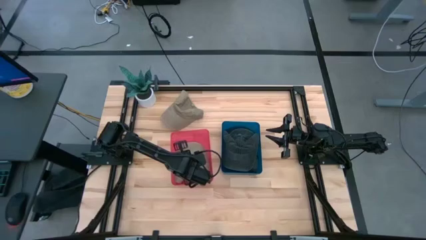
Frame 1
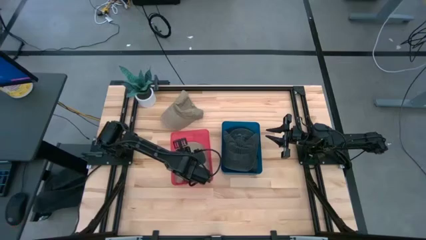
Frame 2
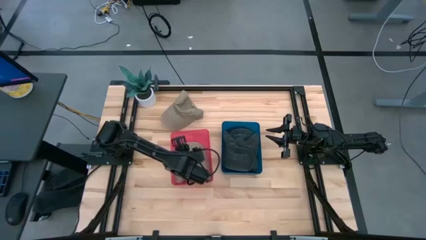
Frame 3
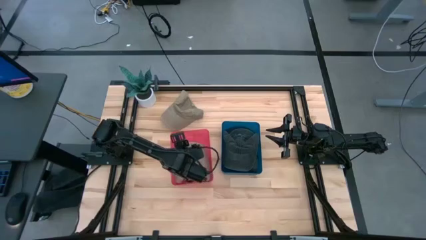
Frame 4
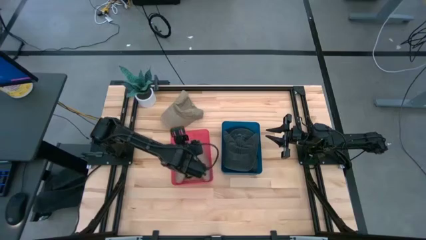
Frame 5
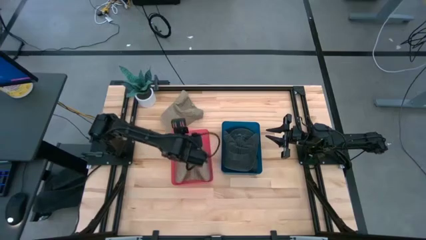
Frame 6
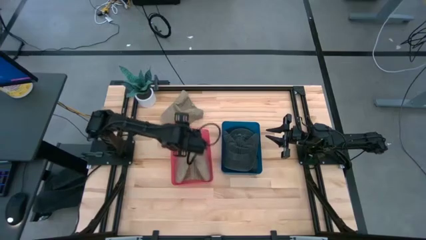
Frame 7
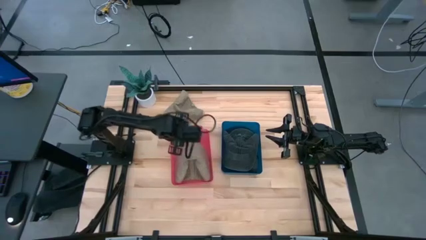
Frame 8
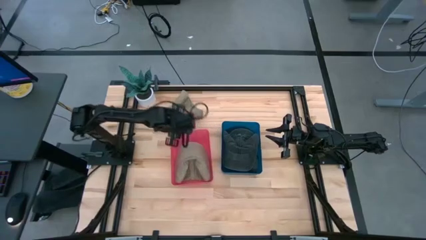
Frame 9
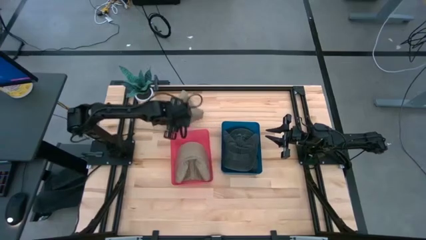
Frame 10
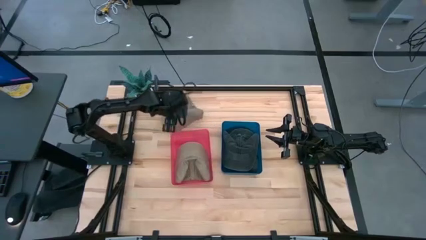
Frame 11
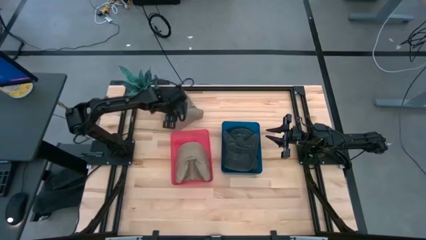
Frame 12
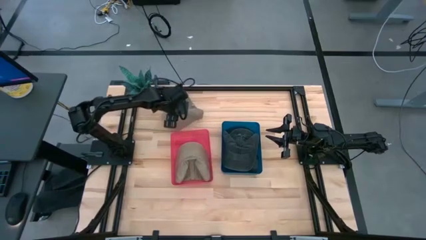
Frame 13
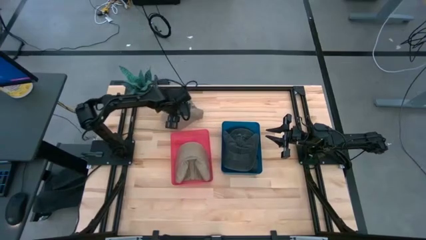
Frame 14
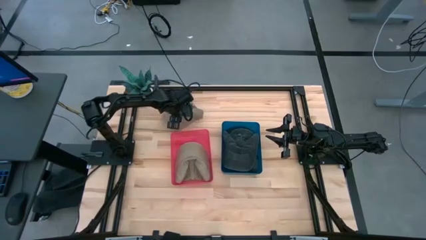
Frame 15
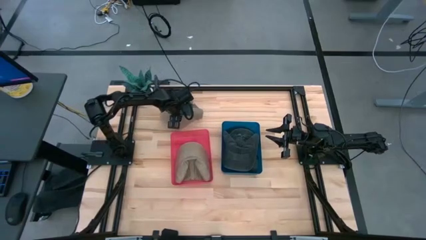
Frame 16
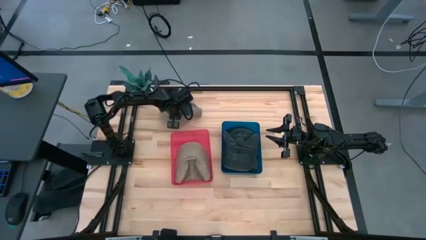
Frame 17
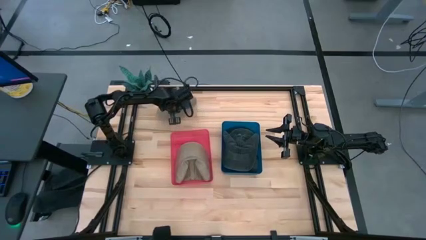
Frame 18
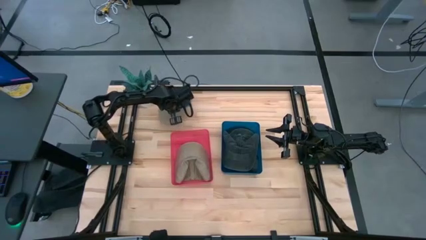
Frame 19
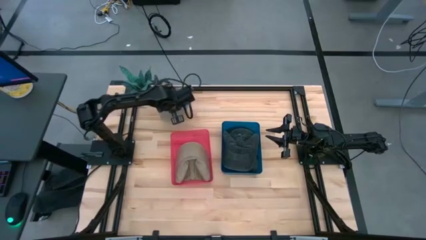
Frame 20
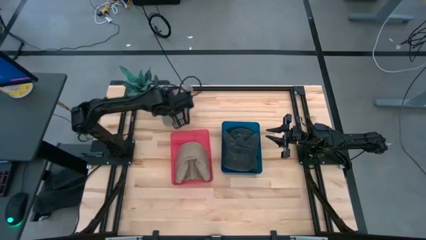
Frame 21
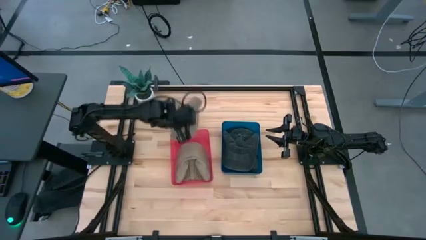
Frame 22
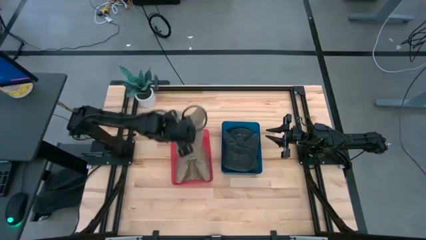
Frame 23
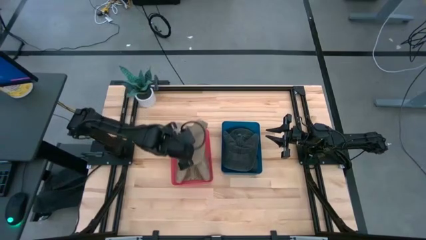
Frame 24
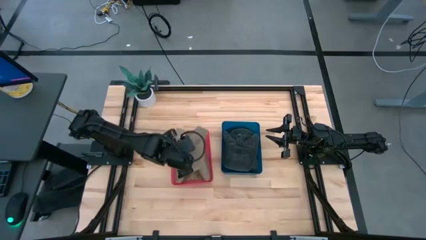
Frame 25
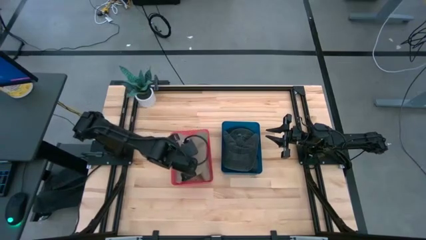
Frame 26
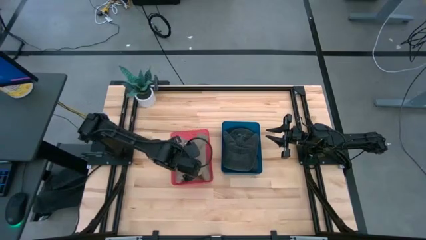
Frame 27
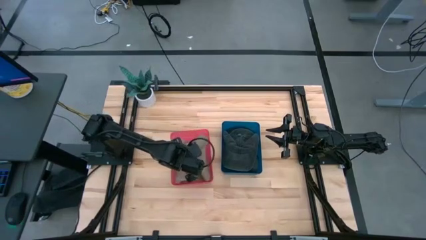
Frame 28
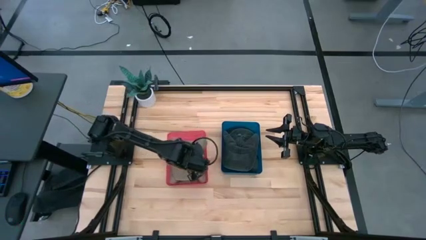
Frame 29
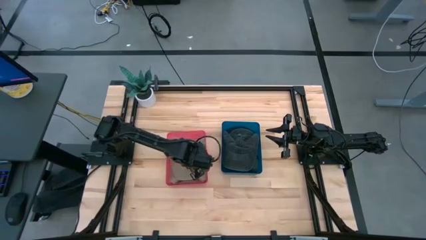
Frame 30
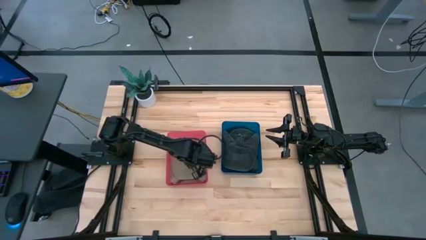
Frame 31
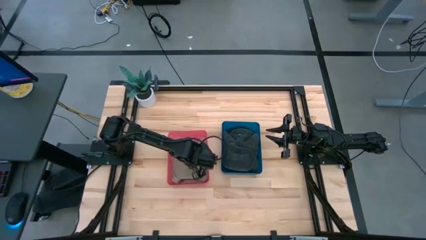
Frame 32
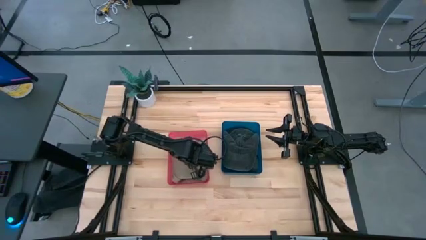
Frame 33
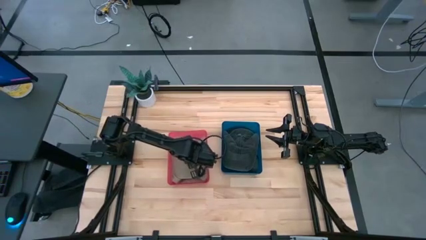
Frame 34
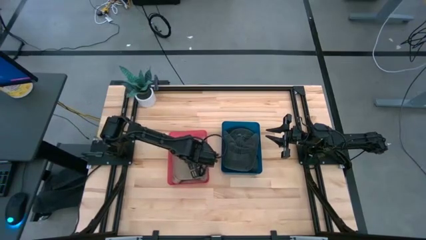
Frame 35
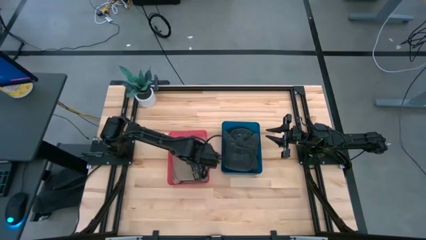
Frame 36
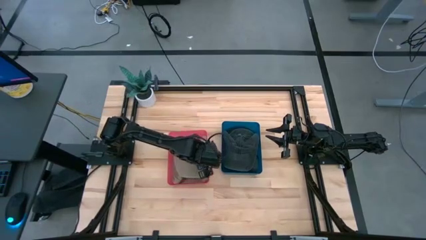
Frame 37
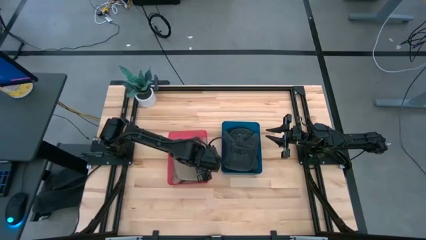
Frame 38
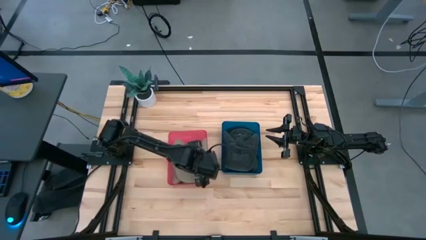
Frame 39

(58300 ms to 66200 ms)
Task: Pick & Place hat
Put the brown cap into the red bin

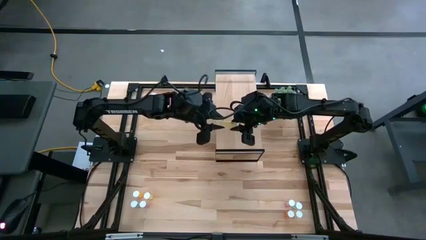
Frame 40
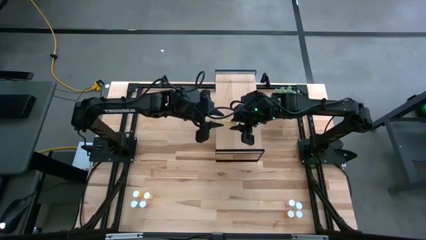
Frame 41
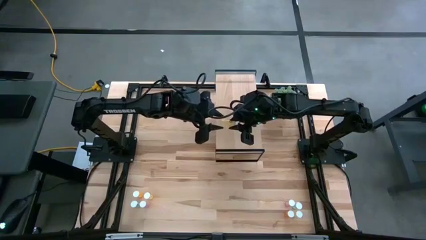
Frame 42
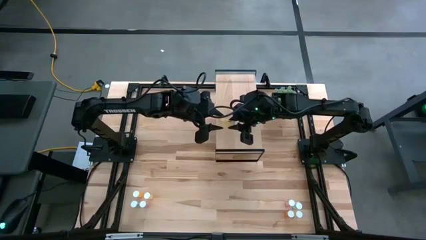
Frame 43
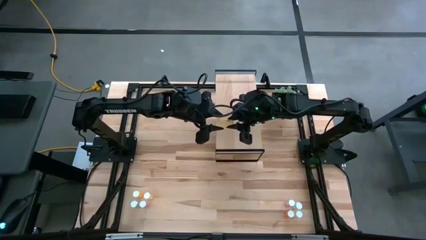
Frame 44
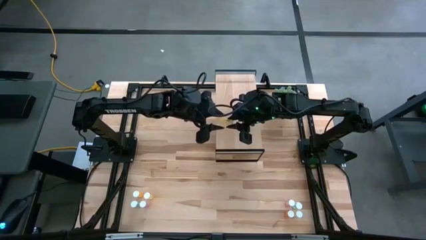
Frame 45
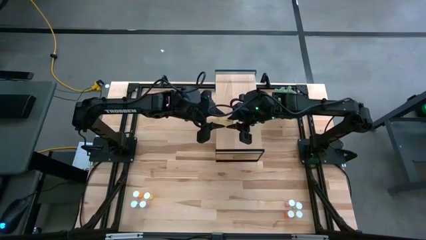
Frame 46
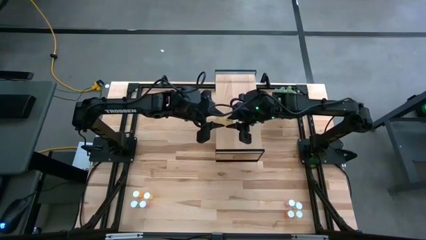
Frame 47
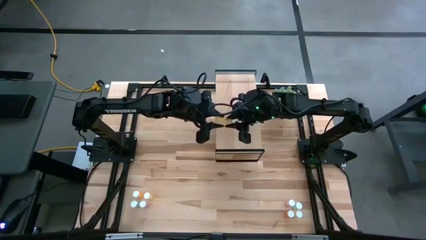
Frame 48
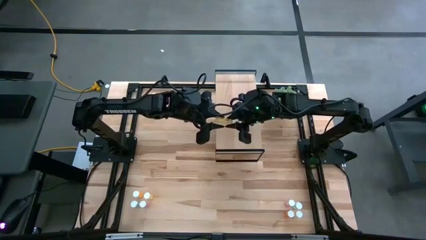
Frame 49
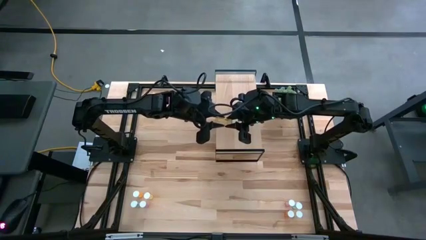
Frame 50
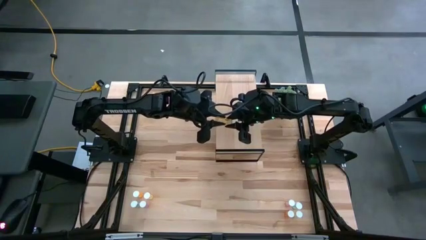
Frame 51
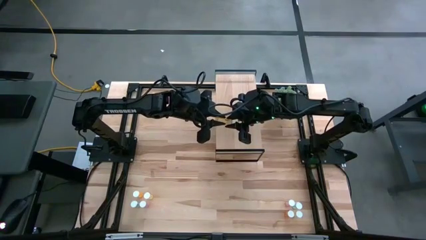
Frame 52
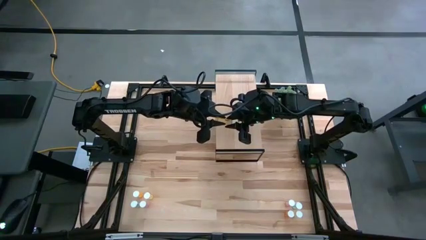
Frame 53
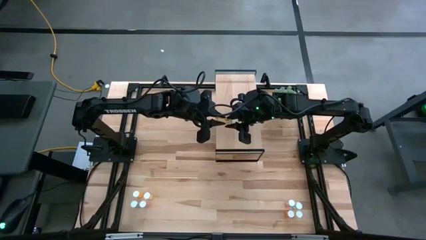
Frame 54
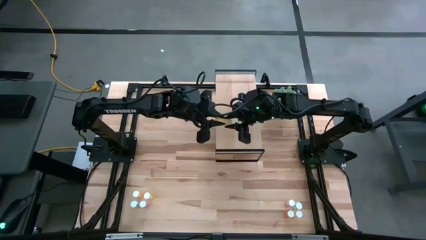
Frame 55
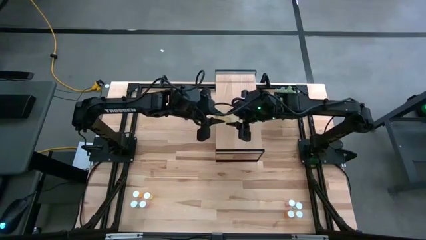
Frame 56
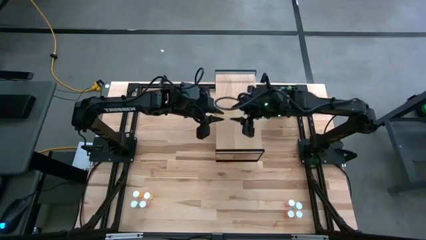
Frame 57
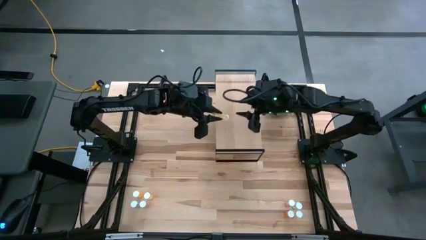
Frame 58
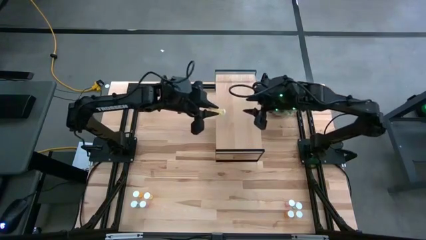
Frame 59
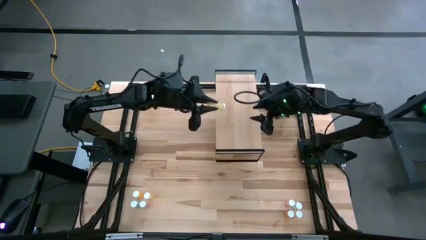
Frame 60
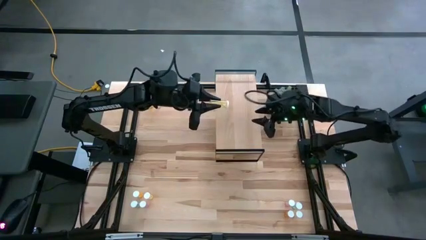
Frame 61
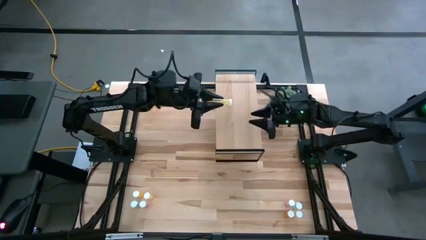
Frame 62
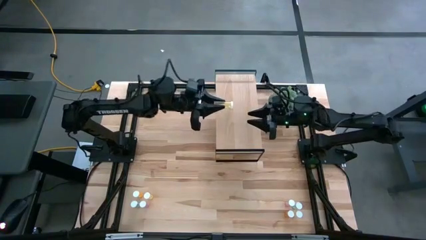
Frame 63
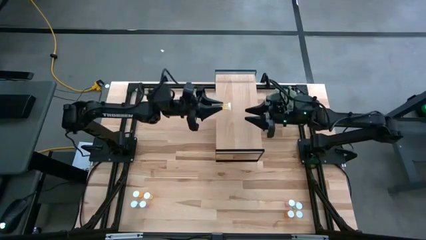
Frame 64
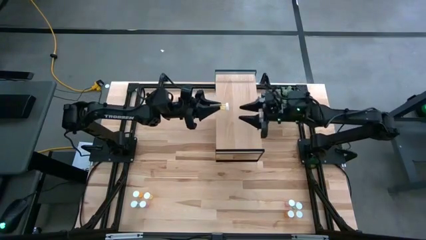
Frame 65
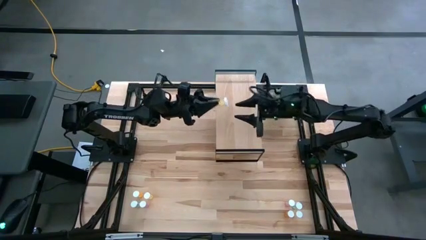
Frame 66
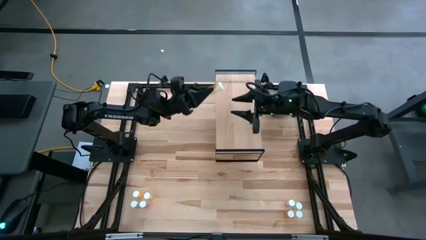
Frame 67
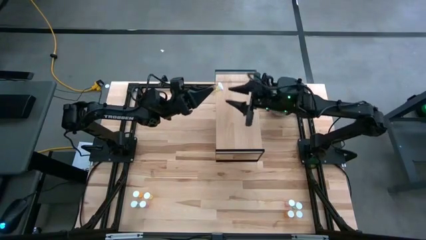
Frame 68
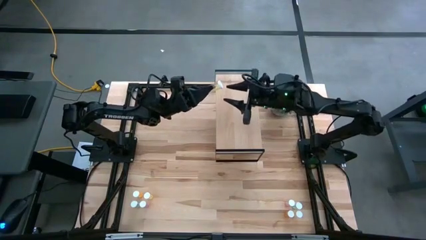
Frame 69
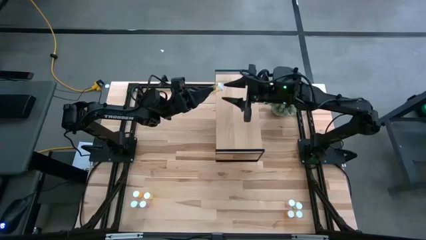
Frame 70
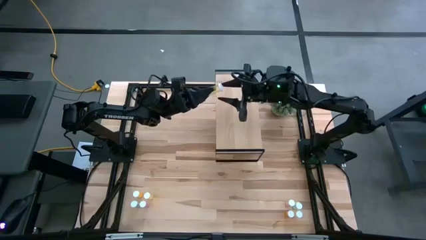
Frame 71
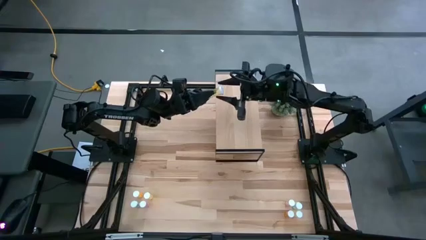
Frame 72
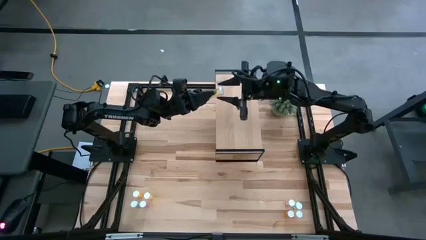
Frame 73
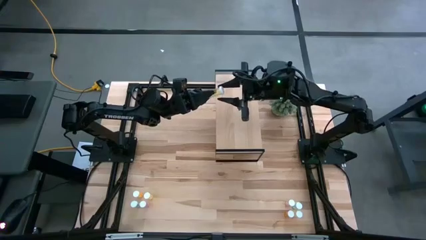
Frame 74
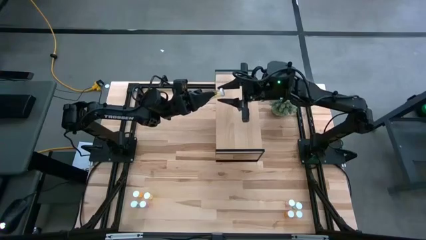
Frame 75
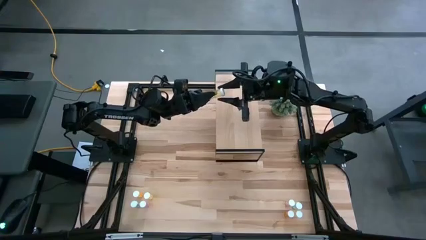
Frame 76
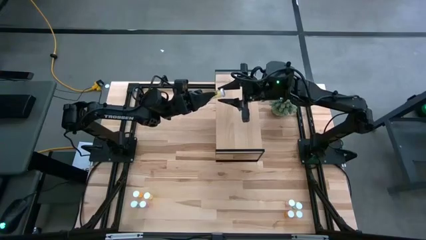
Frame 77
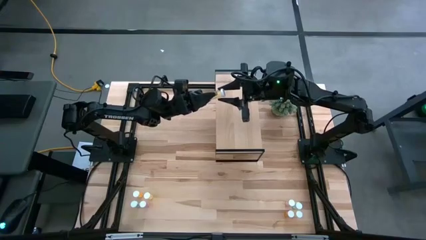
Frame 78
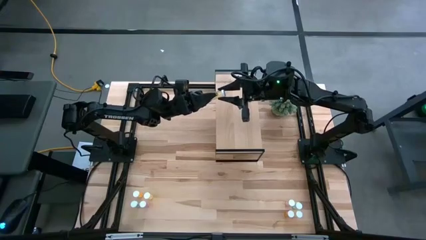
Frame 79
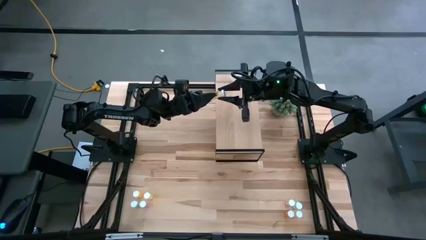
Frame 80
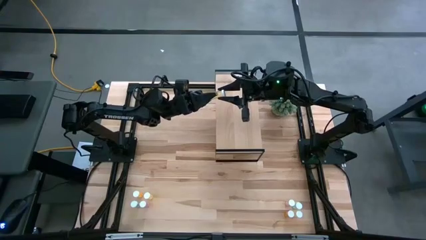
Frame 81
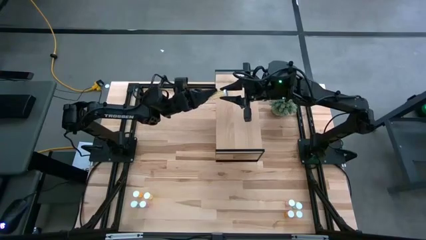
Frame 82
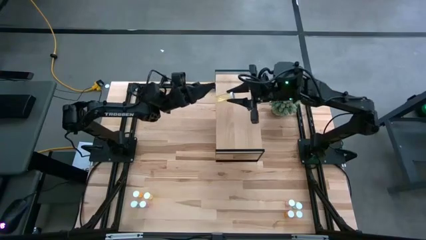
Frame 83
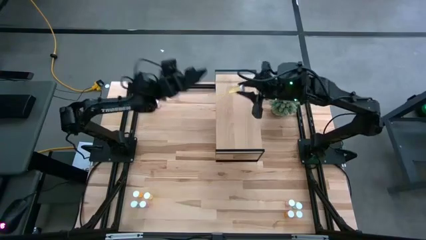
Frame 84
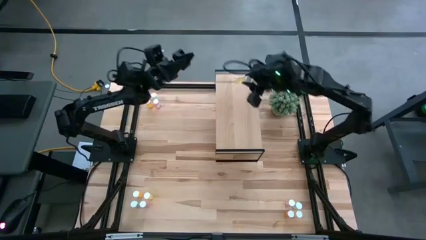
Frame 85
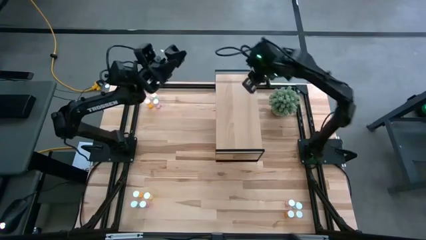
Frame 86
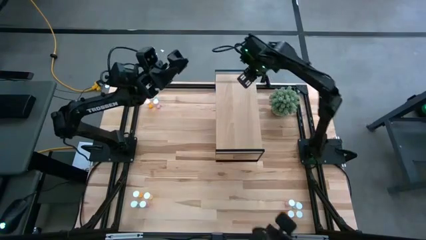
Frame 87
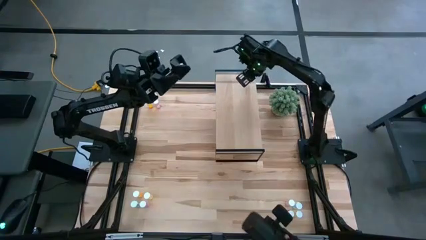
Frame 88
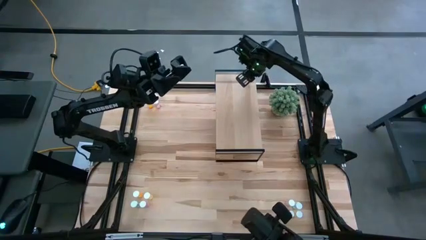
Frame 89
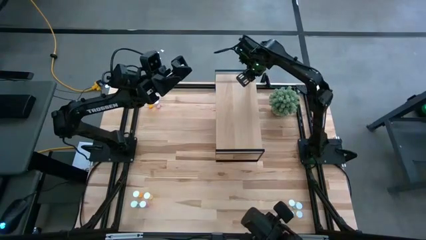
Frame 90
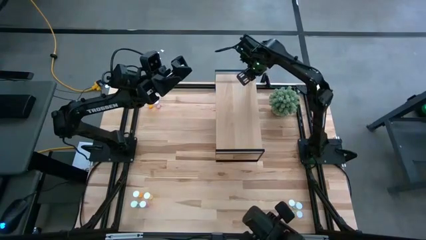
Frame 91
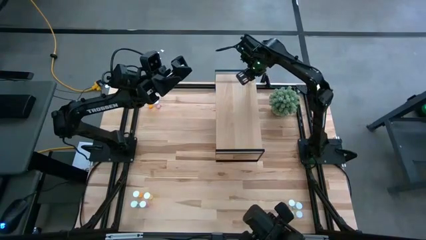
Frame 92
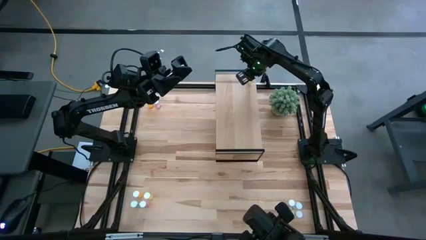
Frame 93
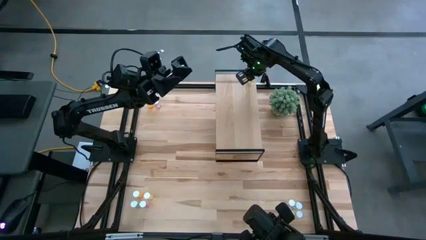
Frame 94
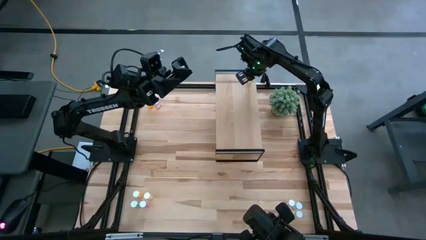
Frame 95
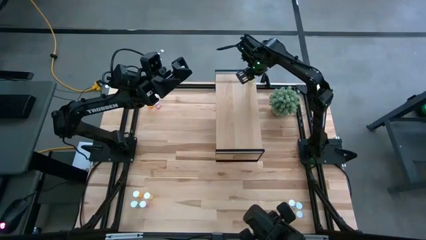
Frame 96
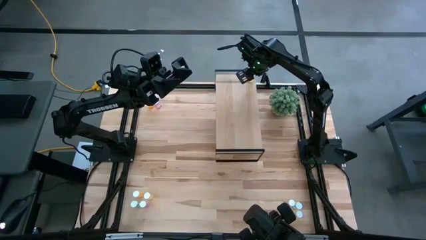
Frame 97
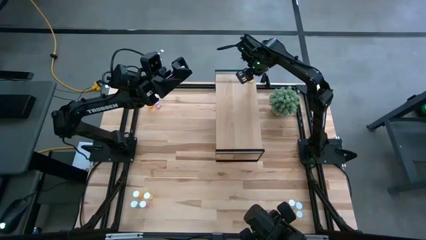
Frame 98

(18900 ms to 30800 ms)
Task: Pick and place medicine bottles onto shelf by color
Put the top yellow pill bottle on the shelf
